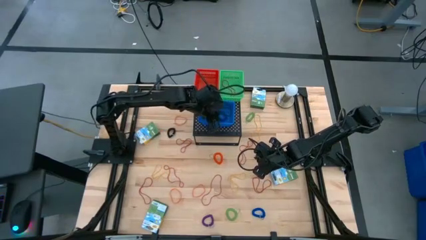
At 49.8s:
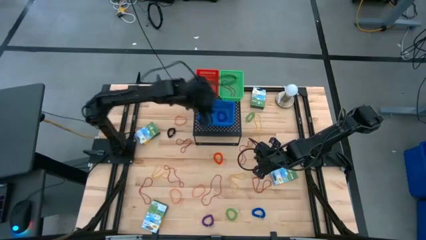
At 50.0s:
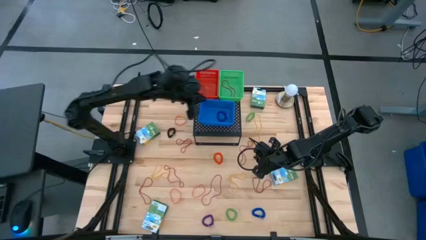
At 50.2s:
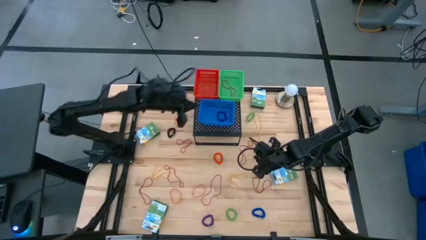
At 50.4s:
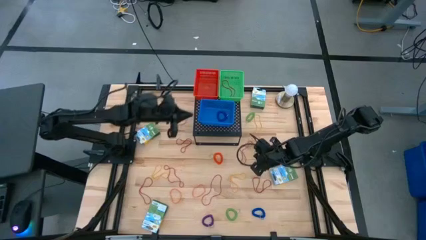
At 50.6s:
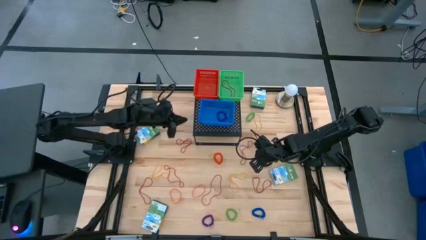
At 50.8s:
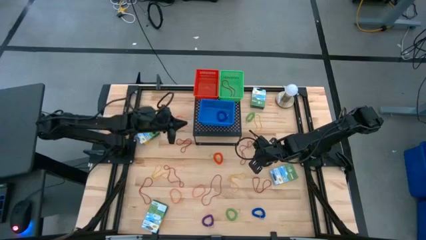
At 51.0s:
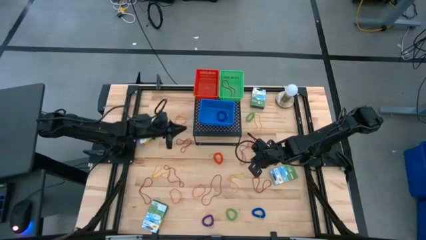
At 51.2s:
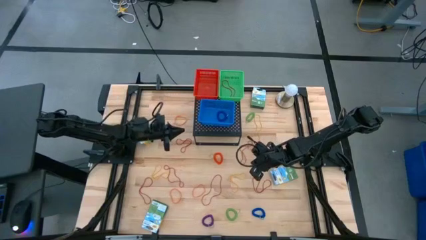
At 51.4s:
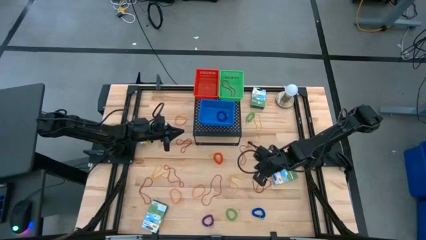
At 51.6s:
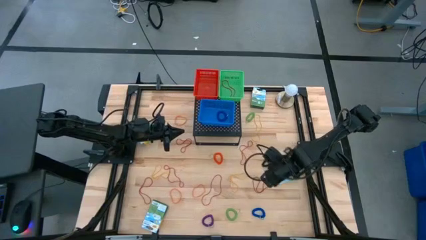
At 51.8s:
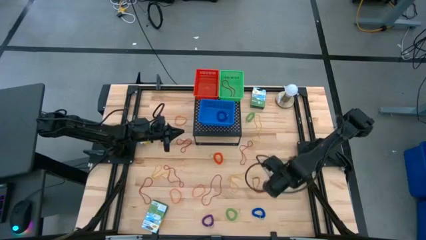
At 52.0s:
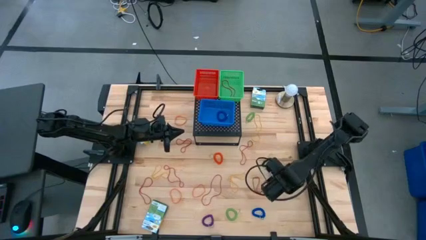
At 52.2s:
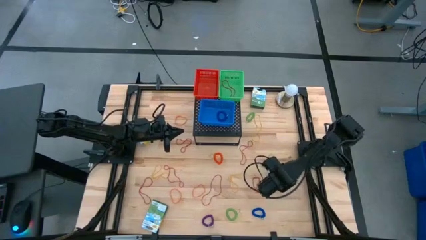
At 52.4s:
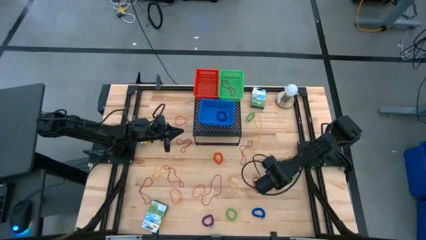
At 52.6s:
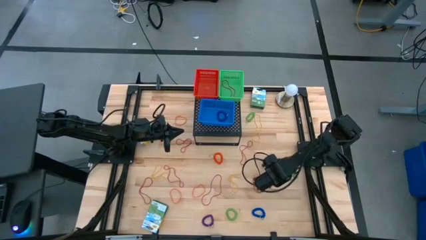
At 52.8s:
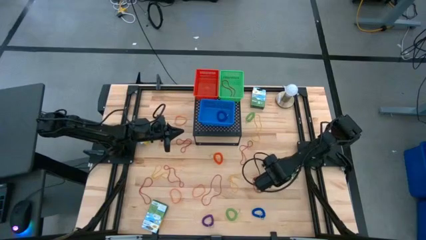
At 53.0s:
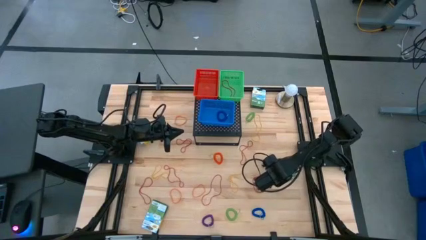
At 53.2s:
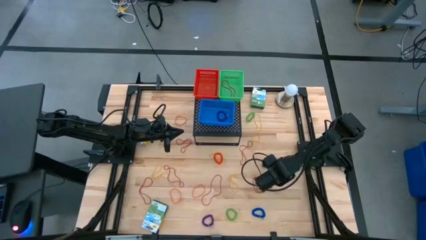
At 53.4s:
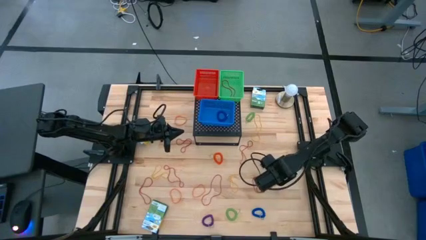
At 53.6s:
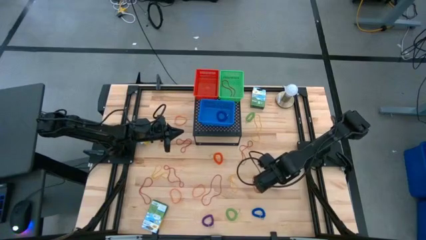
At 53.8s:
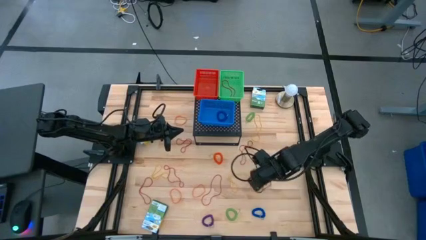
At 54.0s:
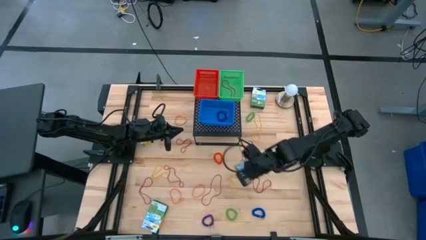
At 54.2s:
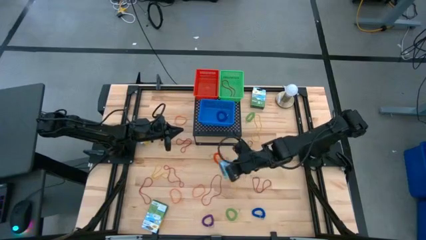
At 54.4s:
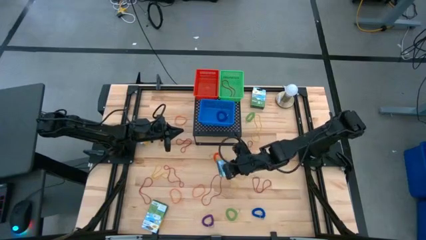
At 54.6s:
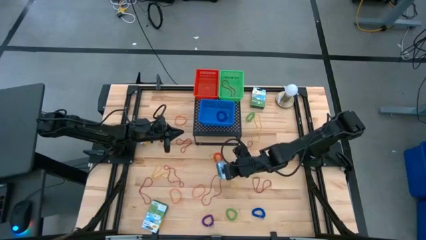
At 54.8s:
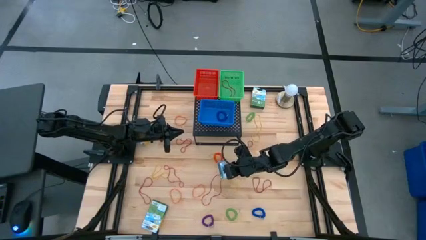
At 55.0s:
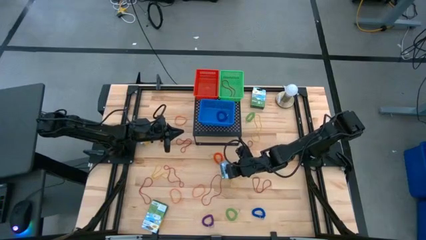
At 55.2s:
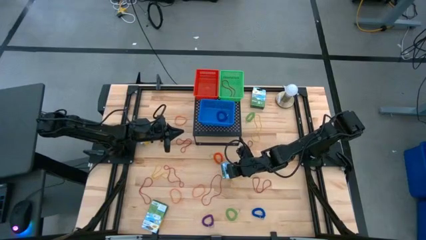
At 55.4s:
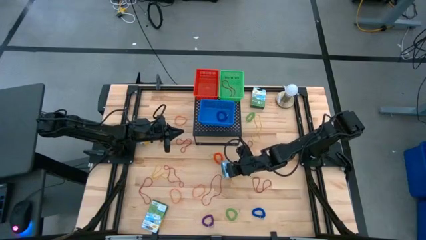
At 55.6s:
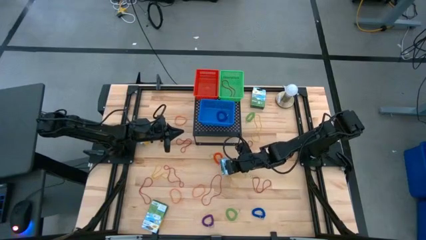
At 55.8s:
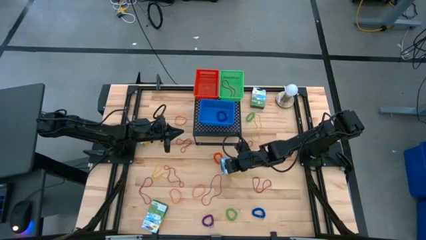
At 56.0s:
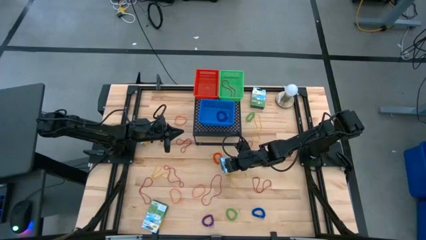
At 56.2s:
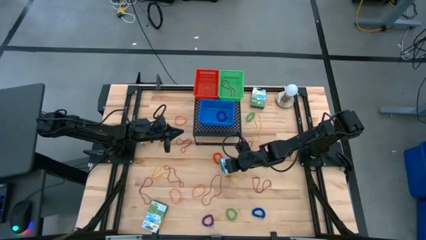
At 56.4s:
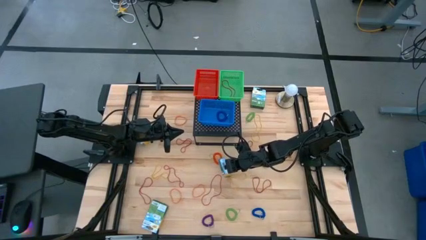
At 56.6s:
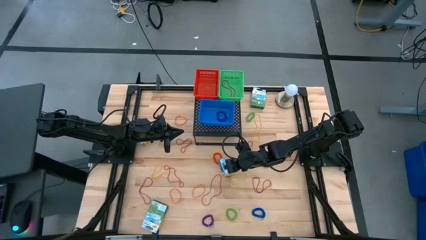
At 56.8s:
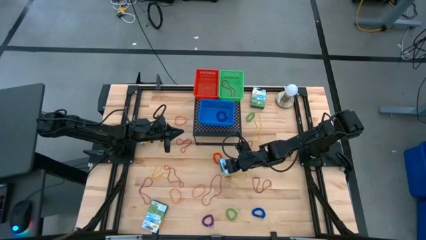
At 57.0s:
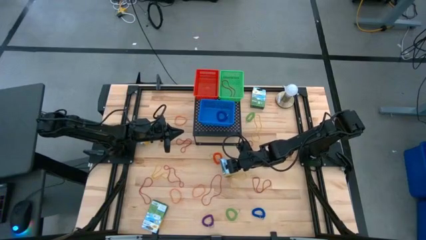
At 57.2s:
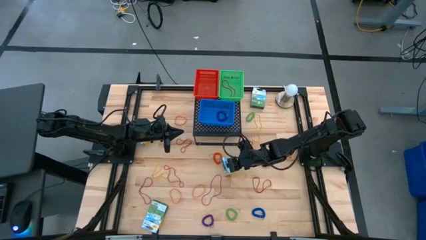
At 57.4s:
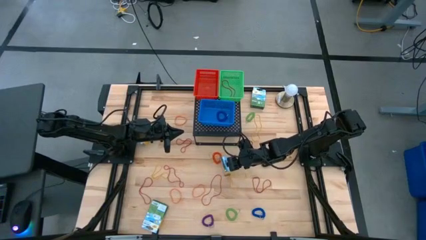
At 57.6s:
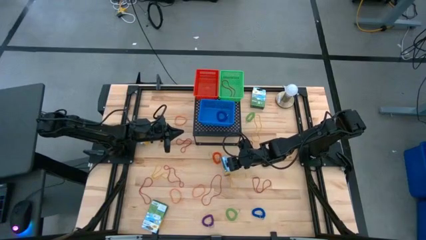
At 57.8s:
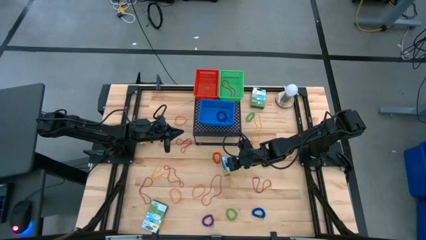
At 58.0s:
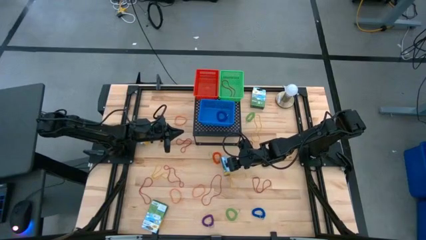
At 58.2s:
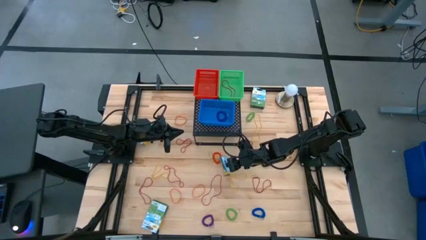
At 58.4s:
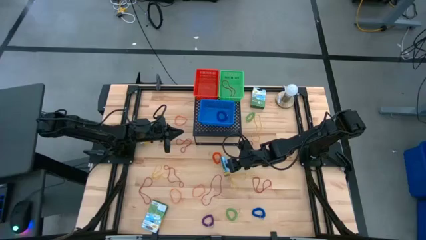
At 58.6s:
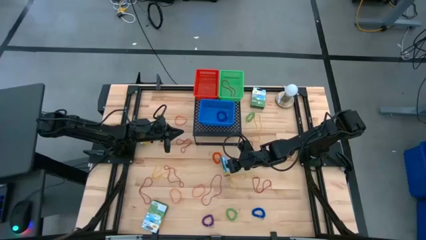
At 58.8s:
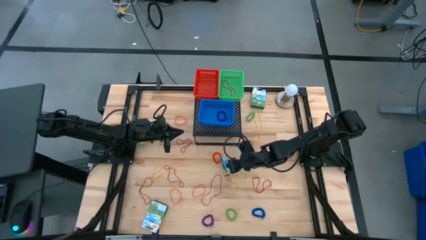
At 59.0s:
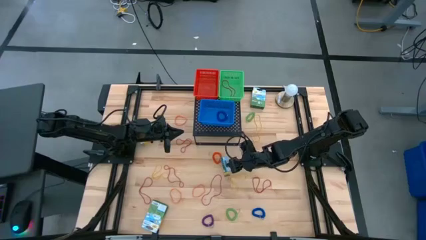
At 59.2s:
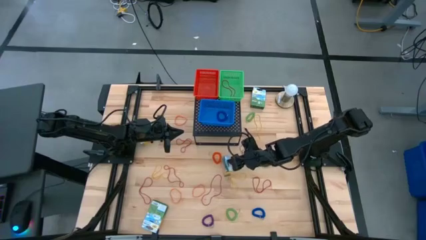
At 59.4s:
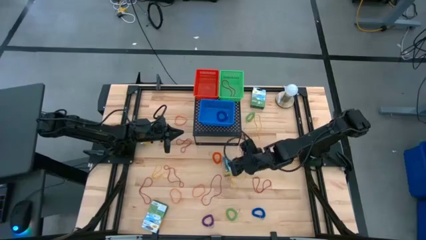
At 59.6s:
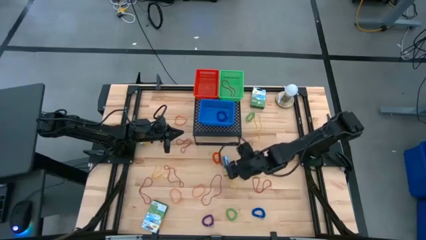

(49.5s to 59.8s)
Task: Pick & Place Office Desk Supplies
Put the yellow crayon box into the red bin on the shelf

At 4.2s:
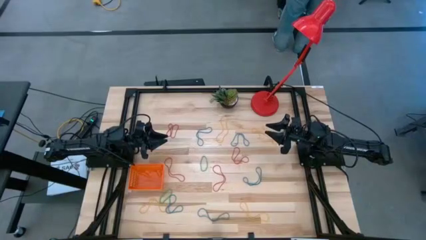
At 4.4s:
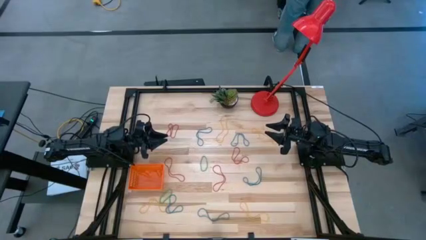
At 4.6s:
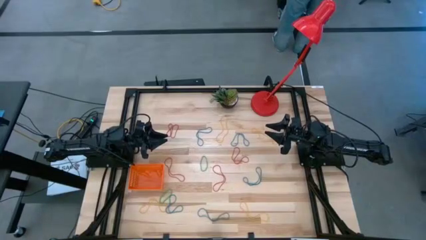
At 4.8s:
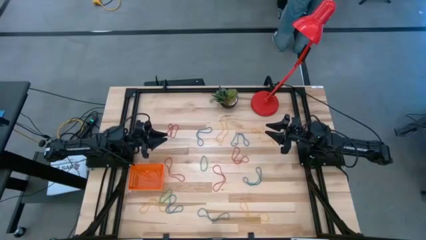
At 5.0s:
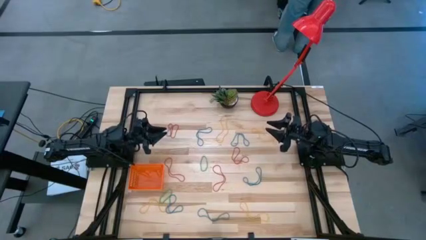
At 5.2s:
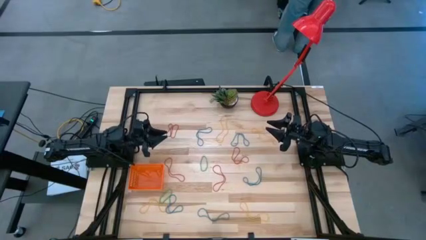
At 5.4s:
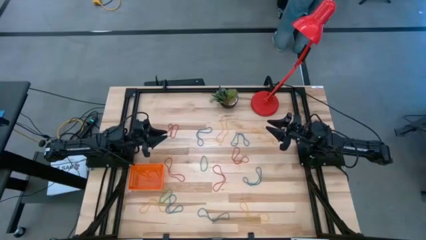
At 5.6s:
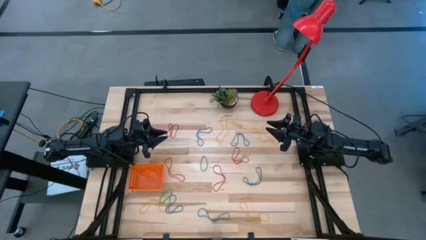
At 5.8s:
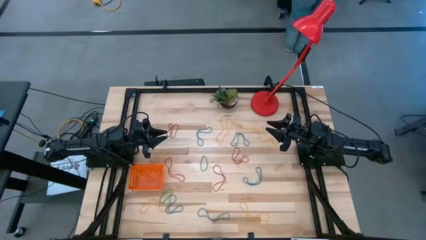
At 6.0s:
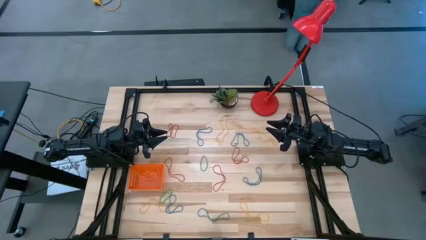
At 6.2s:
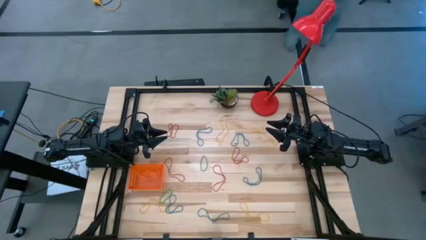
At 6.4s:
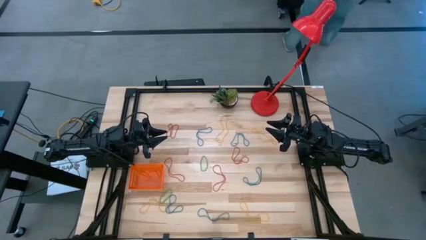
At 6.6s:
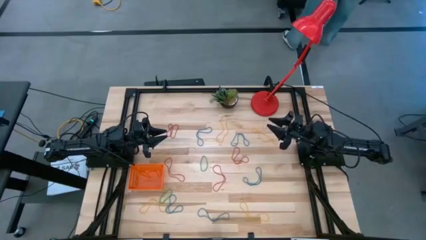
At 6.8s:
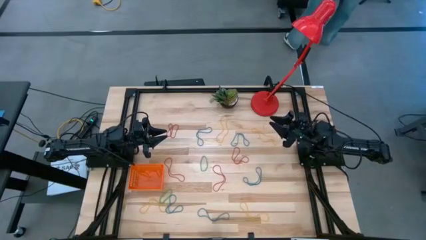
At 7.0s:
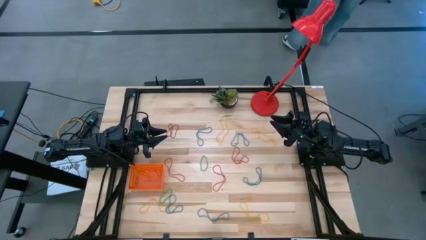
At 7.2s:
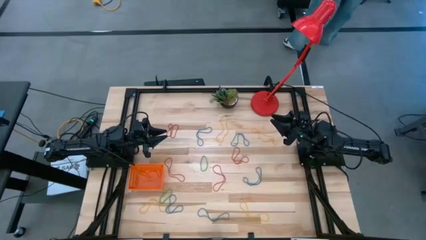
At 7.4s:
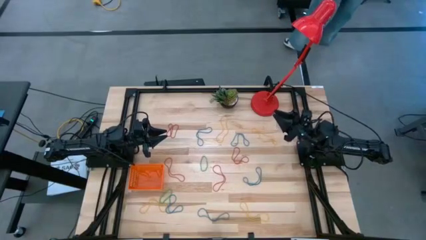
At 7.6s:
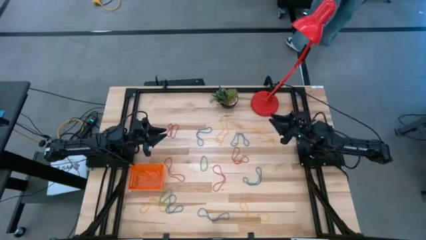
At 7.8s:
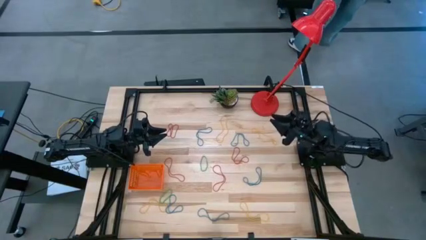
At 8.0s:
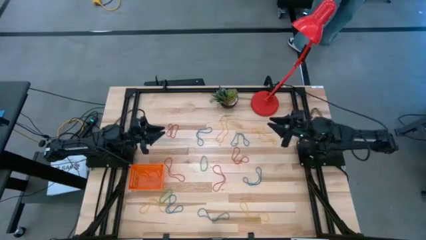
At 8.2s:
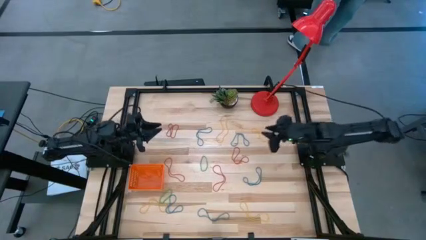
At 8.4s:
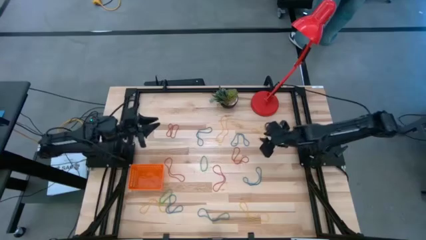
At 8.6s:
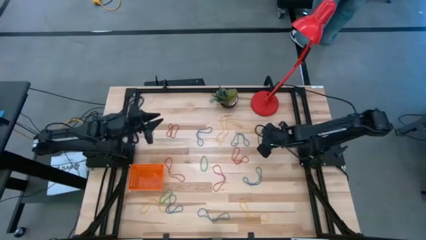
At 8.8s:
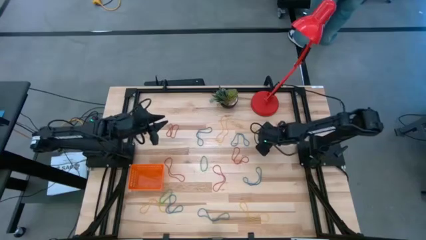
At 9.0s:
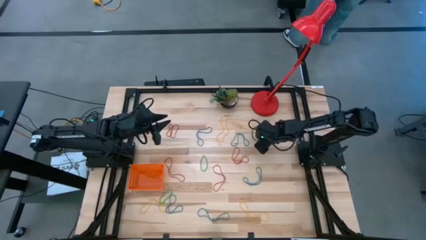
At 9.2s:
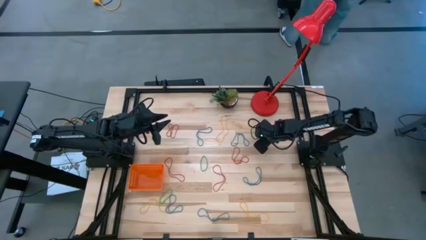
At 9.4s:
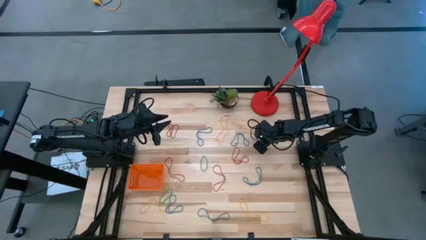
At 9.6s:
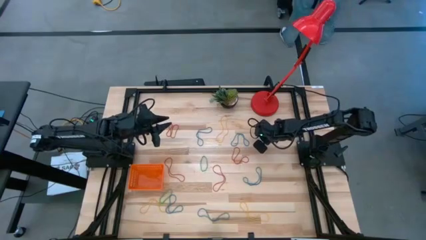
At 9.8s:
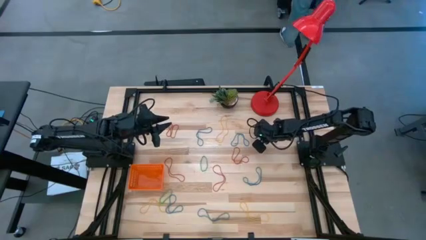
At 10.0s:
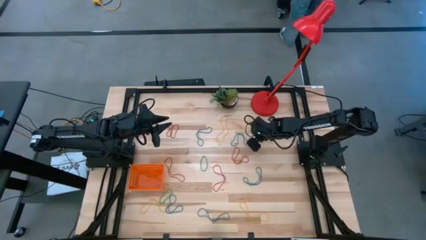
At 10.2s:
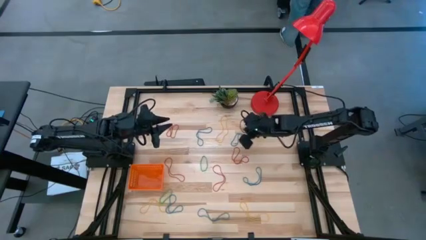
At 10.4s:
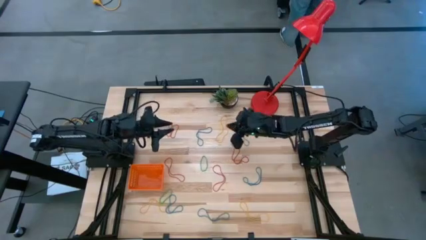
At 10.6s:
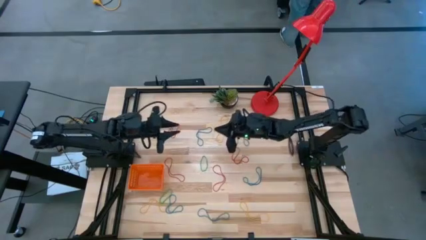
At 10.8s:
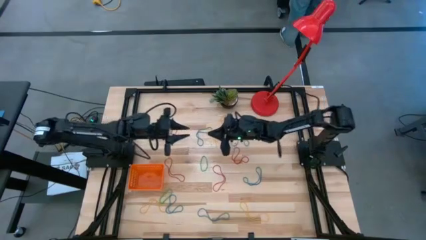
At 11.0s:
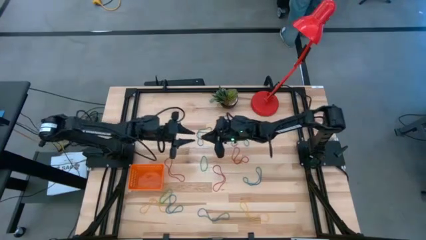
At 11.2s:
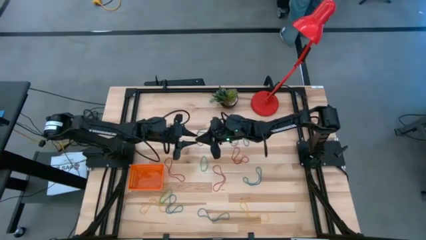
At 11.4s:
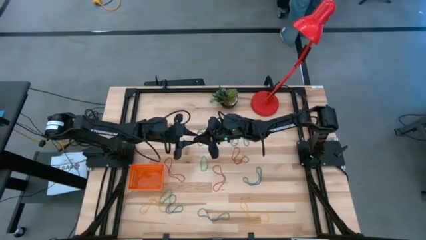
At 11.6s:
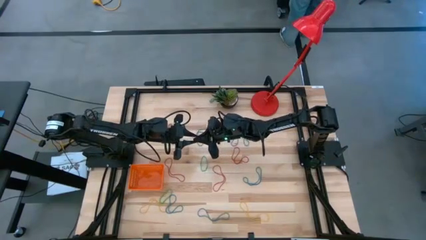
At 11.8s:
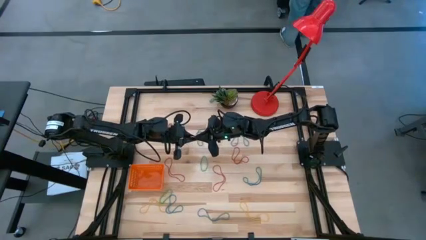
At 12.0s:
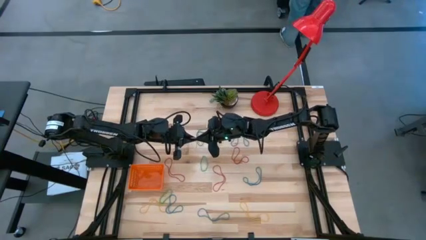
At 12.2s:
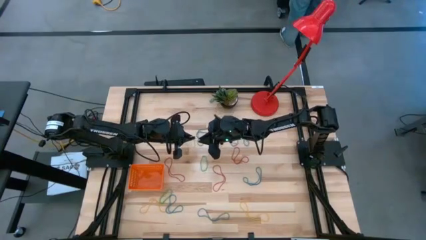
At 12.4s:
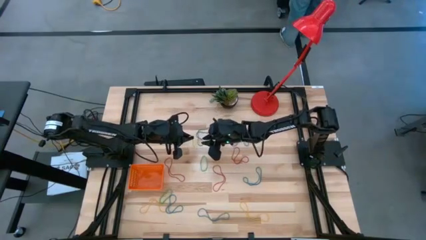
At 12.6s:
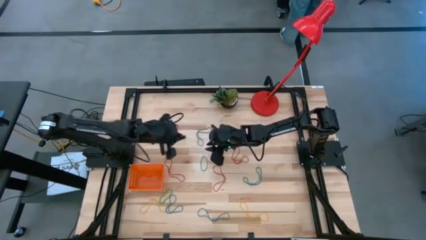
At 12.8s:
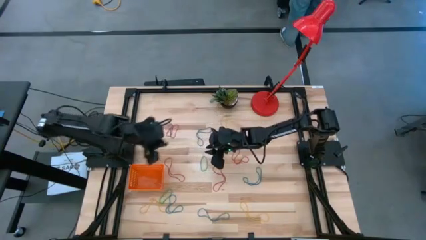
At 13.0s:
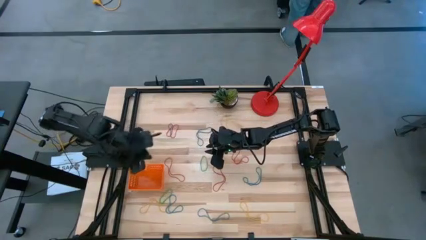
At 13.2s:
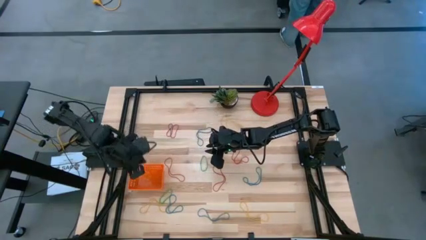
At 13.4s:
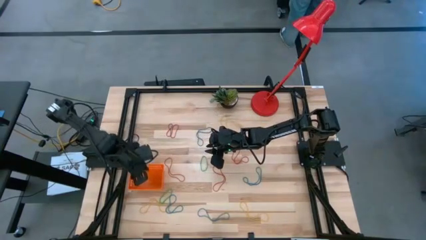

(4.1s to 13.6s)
Task: Pick and place rubber bands into bin
Put the yellow rubber band into the orange basket
